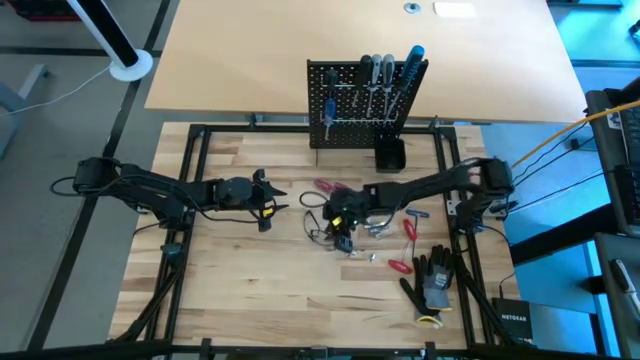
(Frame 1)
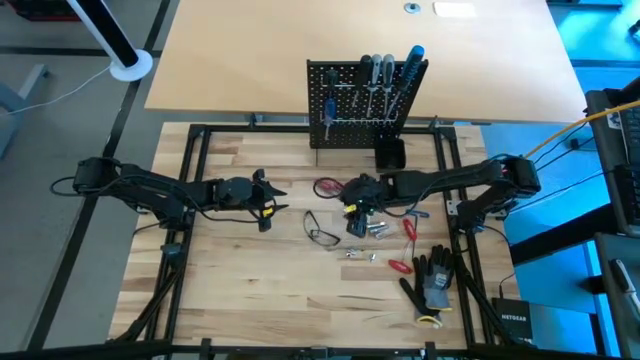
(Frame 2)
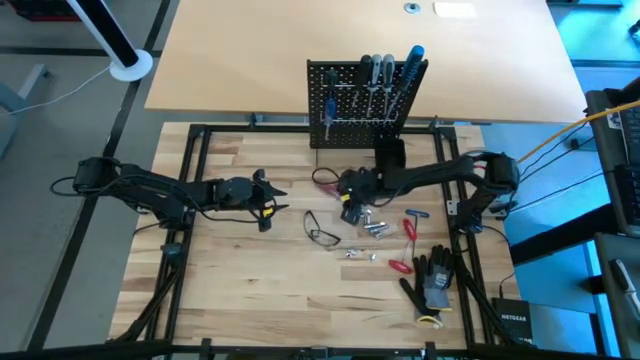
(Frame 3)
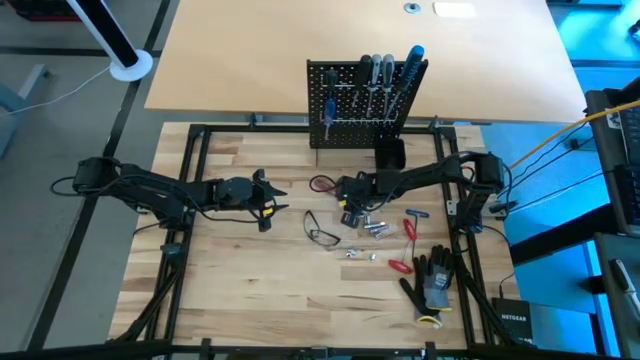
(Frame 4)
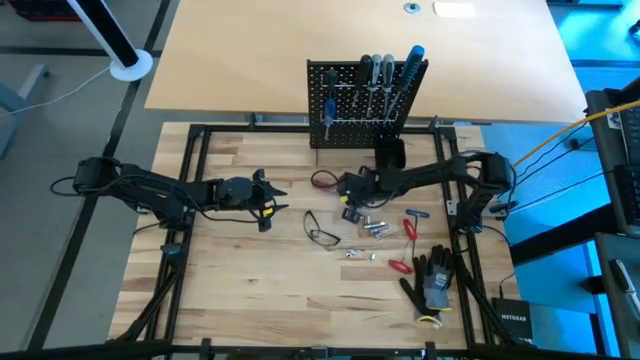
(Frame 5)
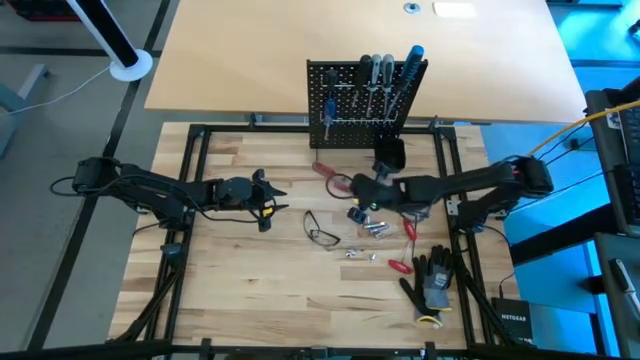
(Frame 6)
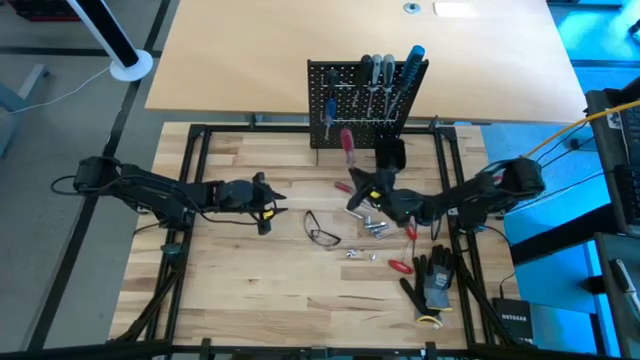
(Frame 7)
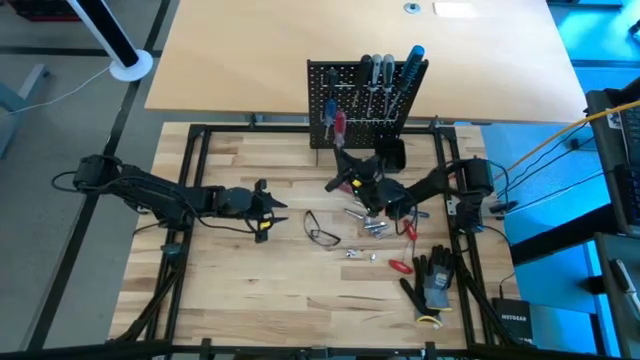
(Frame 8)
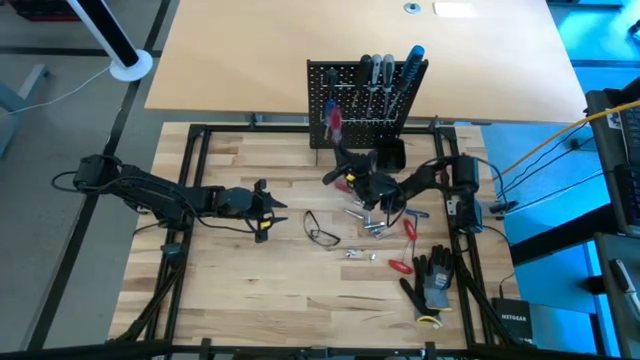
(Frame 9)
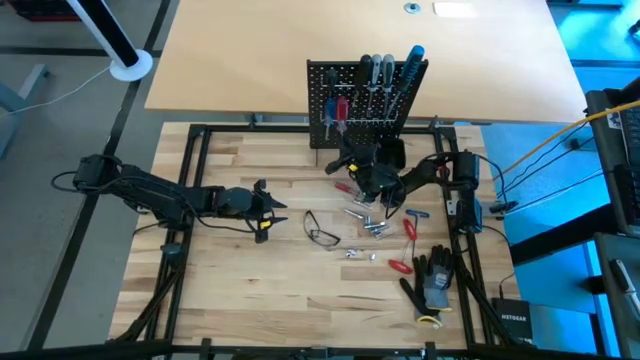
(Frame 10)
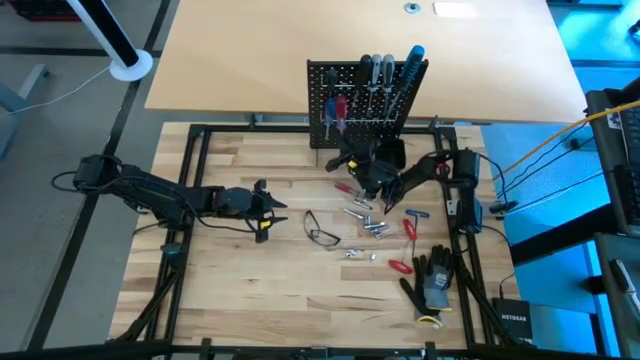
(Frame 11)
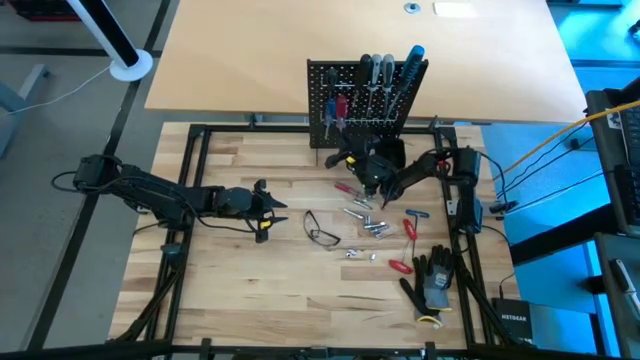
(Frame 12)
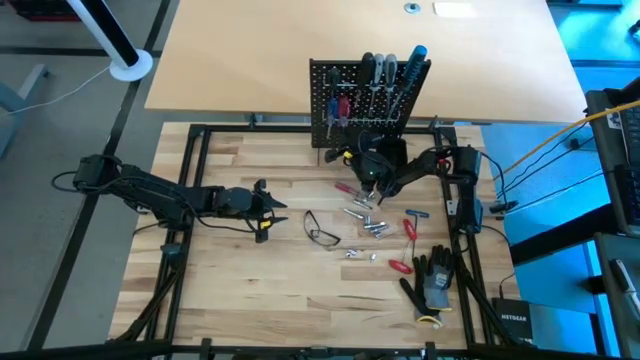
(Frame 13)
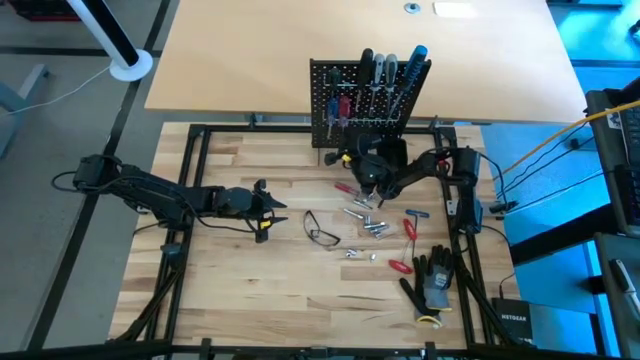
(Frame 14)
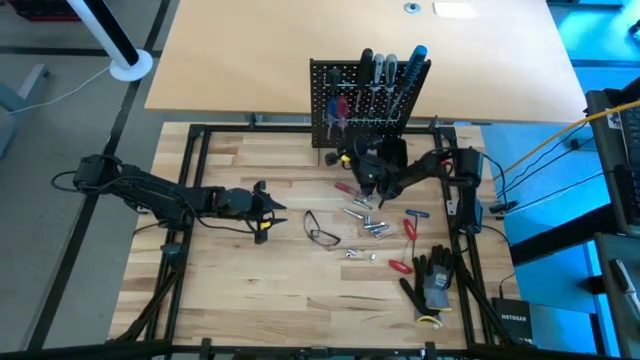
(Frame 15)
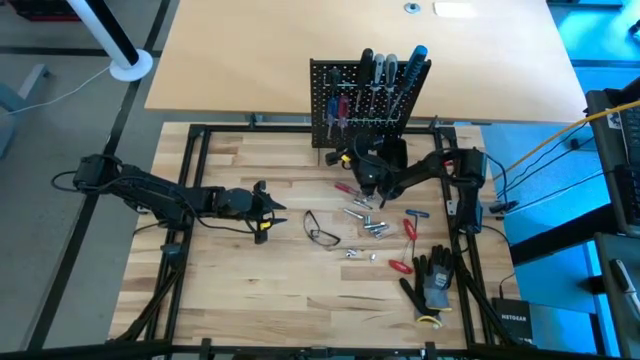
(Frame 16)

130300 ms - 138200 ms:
Task: Hang tools onto peg board
Hang the red transparent screwdriver on the peg board

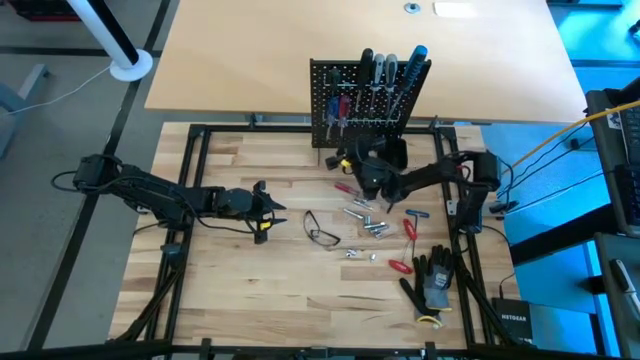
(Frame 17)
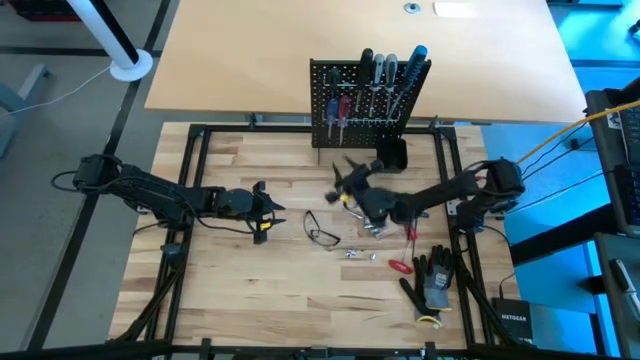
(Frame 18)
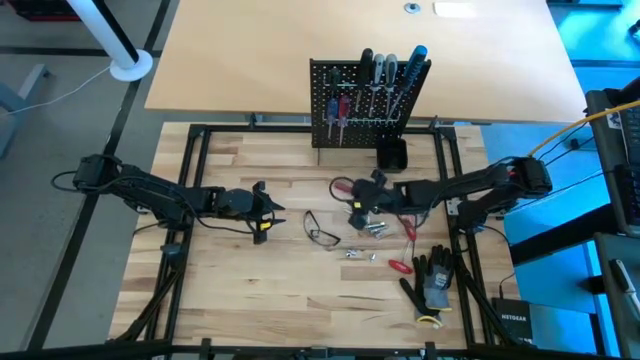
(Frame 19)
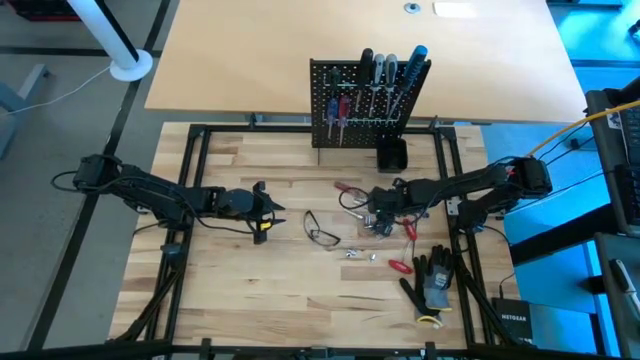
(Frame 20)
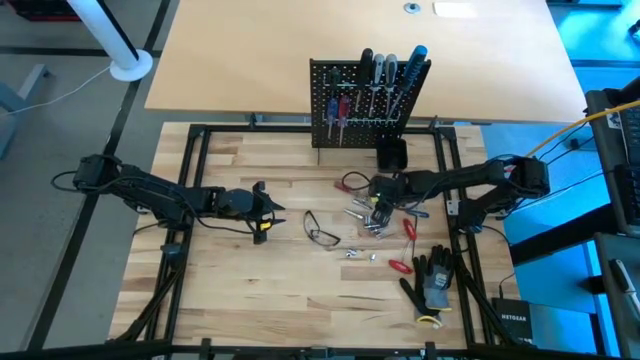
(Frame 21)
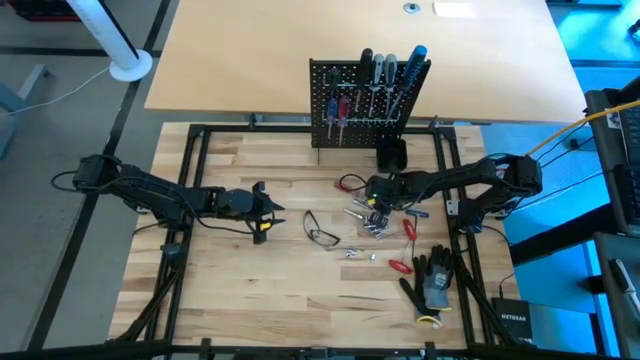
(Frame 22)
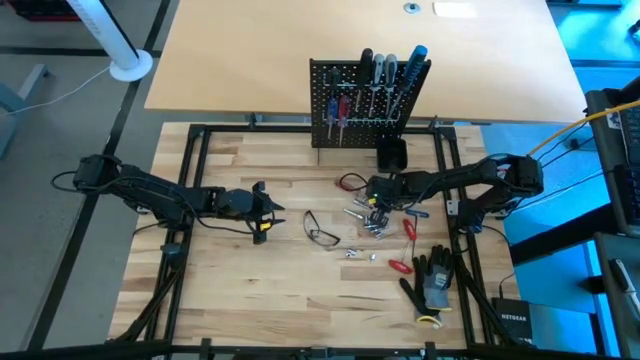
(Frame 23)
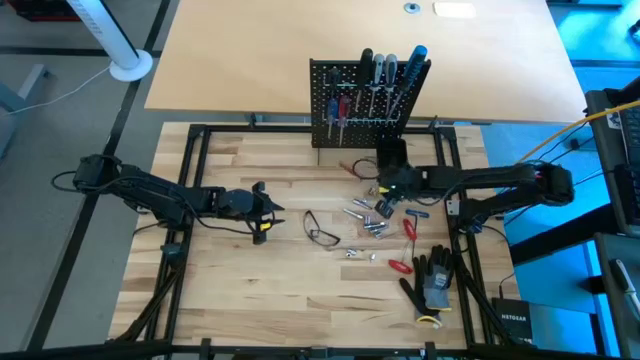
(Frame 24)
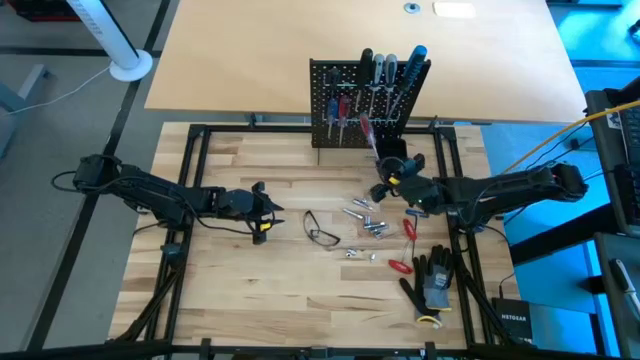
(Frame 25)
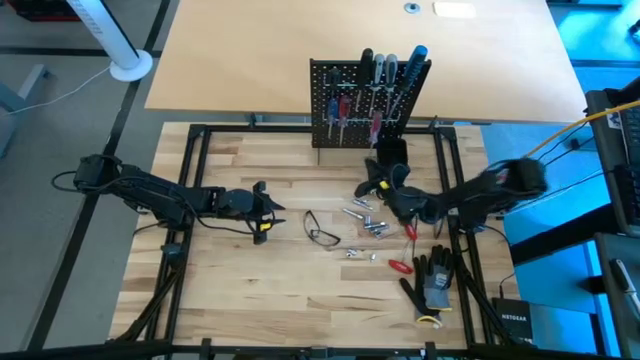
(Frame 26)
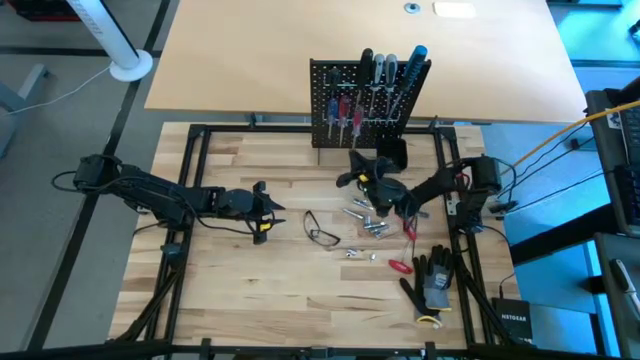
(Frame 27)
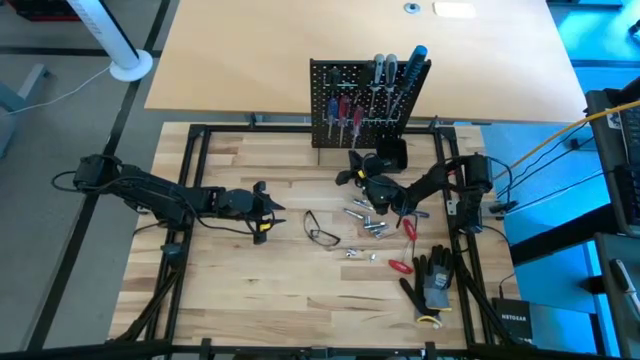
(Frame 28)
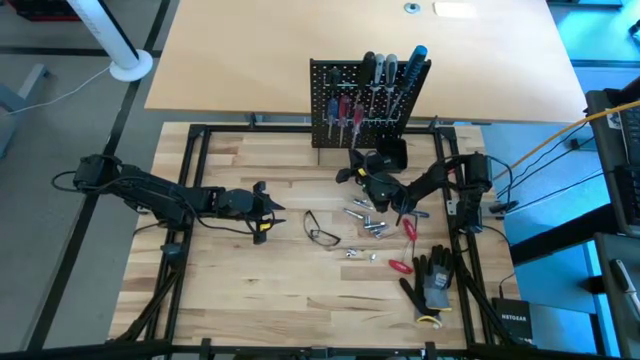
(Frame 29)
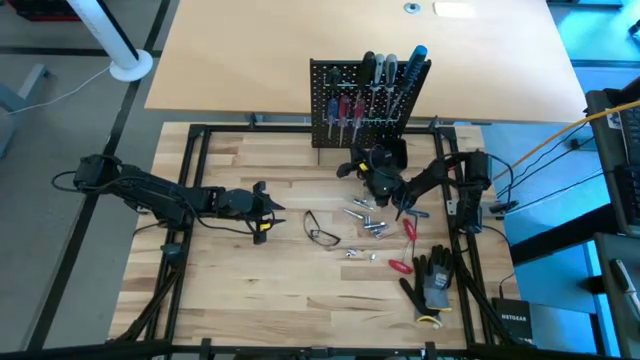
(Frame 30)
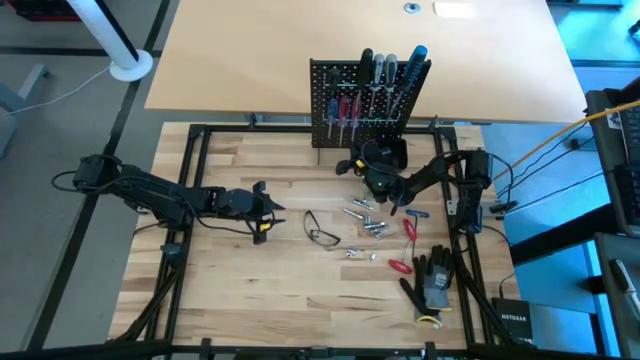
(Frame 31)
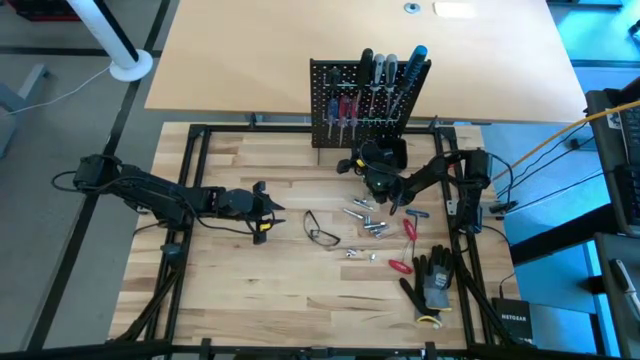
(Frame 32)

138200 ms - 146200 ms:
Hang the red transparent screwdriver on the peg board

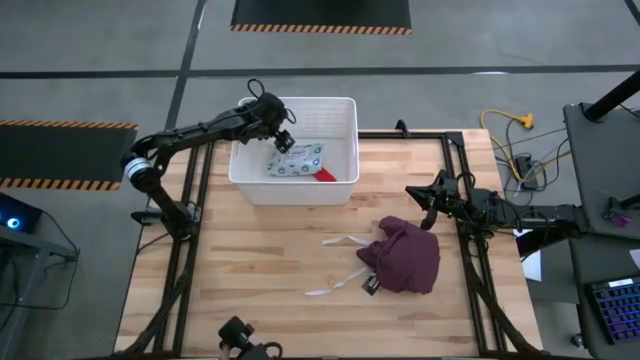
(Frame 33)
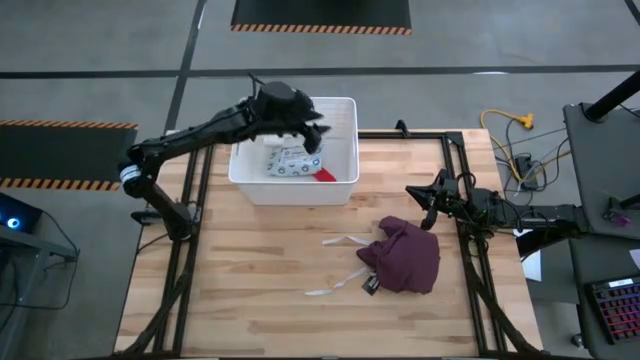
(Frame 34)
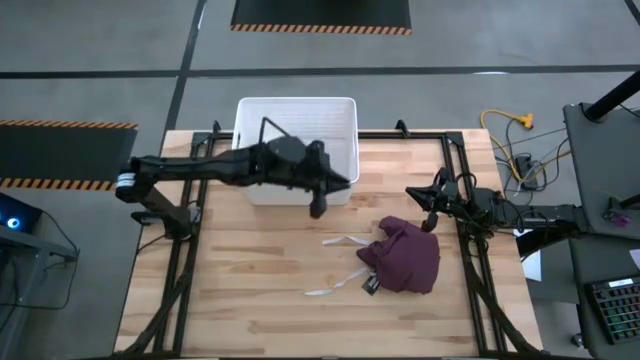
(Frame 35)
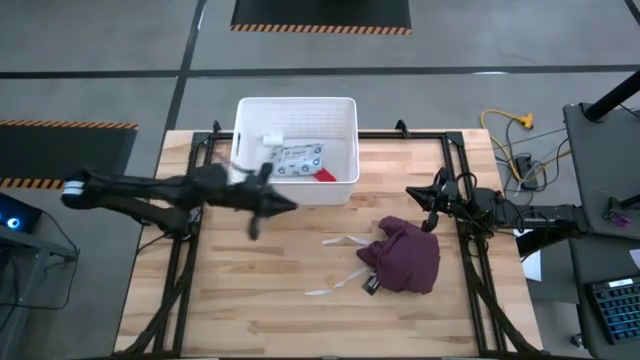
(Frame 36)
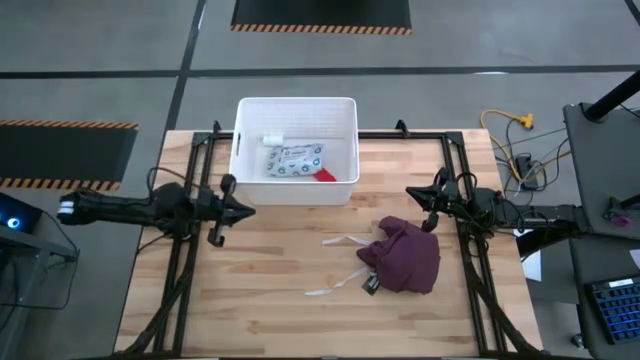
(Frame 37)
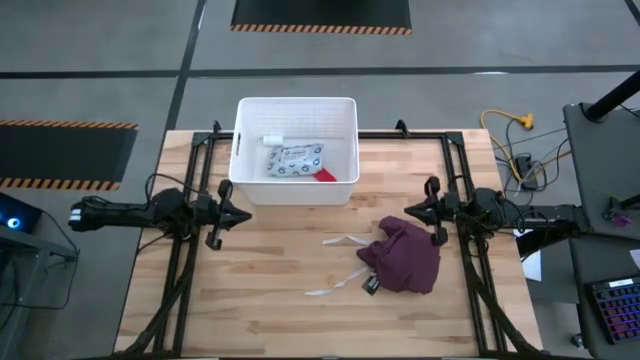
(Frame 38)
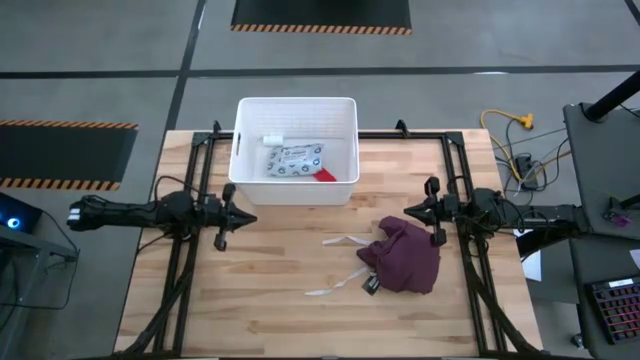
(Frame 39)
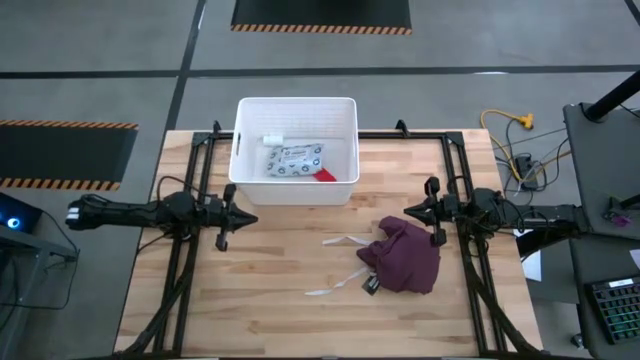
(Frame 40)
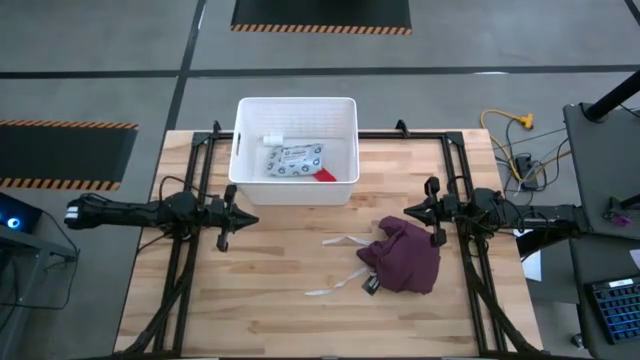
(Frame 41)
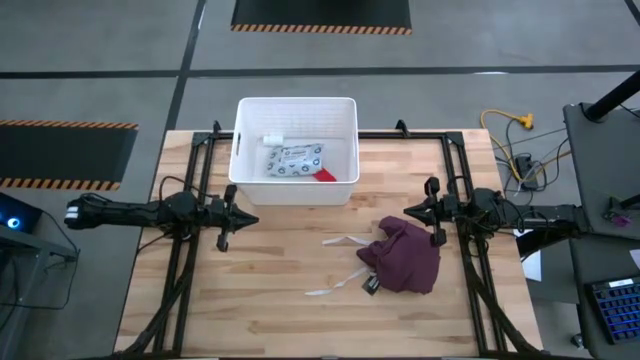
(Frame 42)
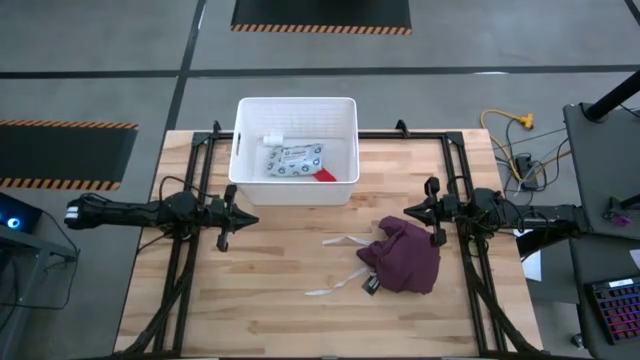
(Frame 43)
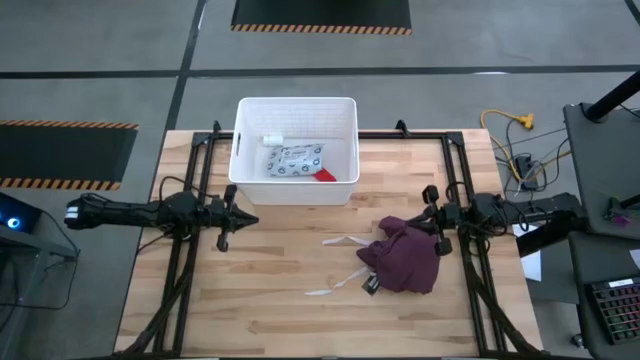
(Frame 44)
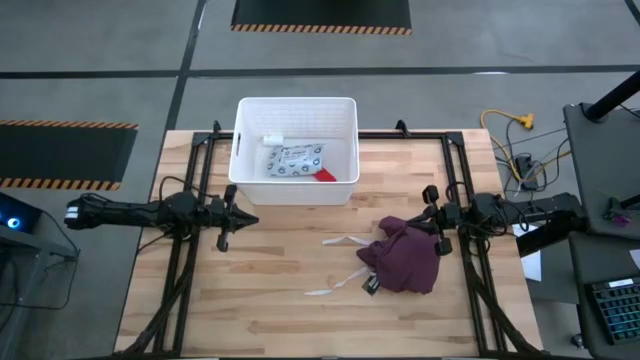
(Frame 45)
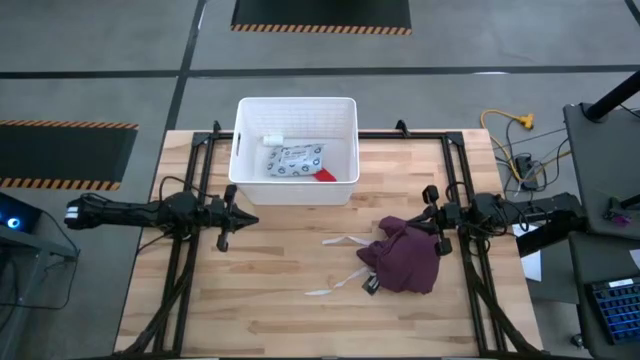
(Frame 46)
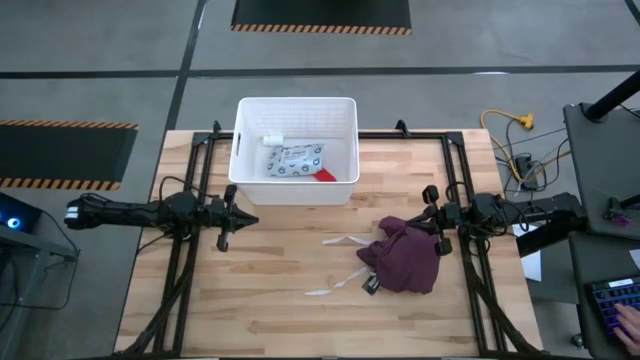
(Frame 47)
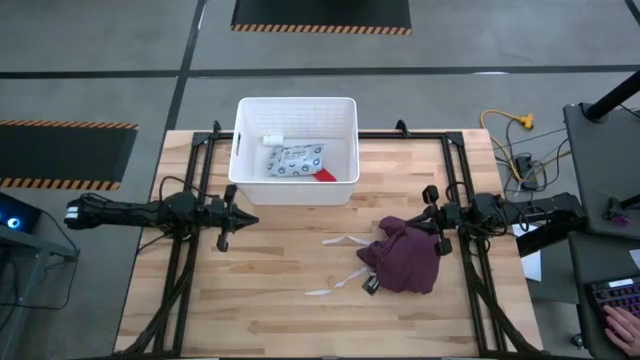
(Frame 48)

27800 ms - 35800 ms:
Task: Pick & place medical supplies in basket/bin
Return to Home Position
